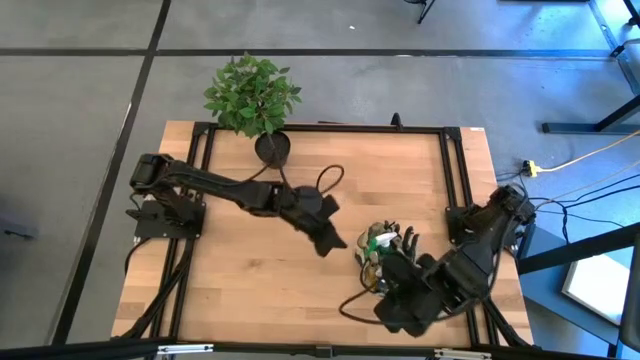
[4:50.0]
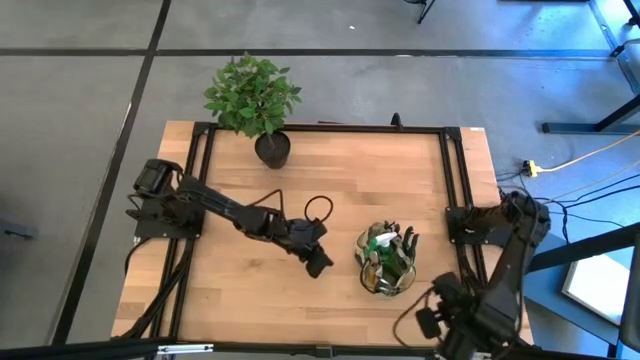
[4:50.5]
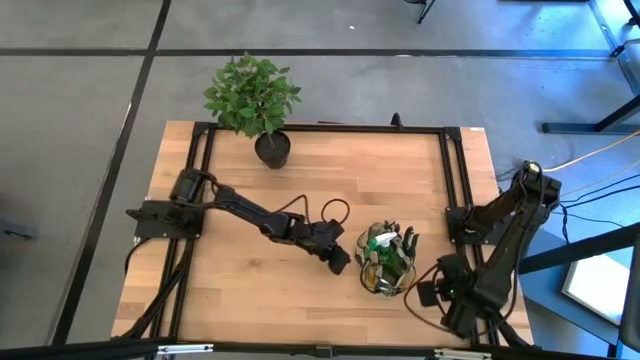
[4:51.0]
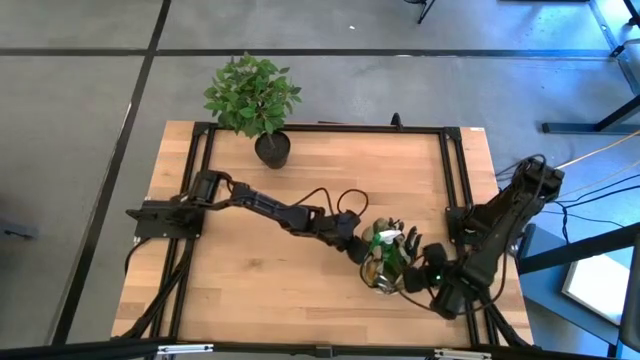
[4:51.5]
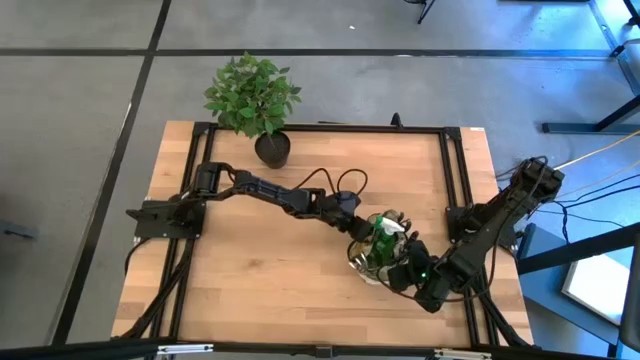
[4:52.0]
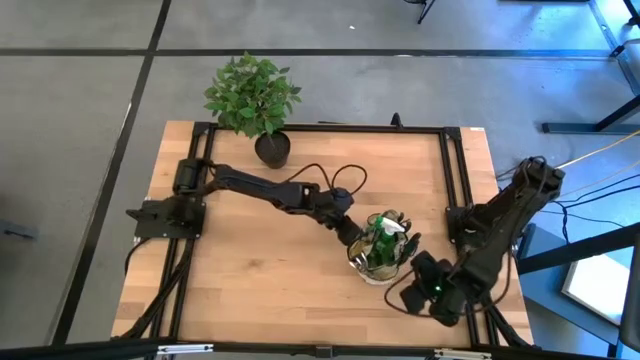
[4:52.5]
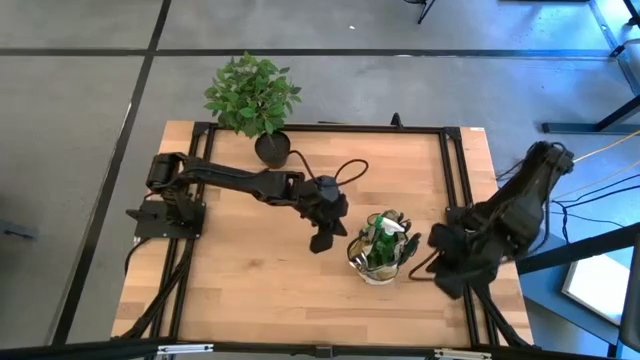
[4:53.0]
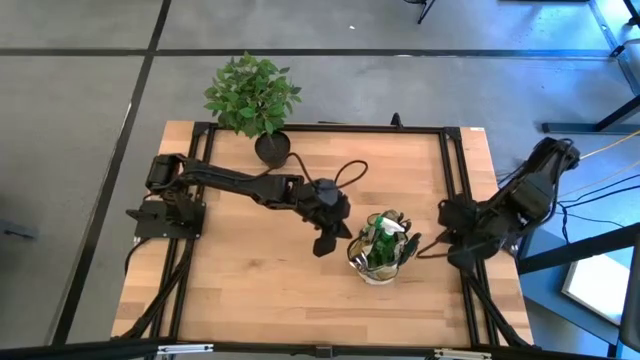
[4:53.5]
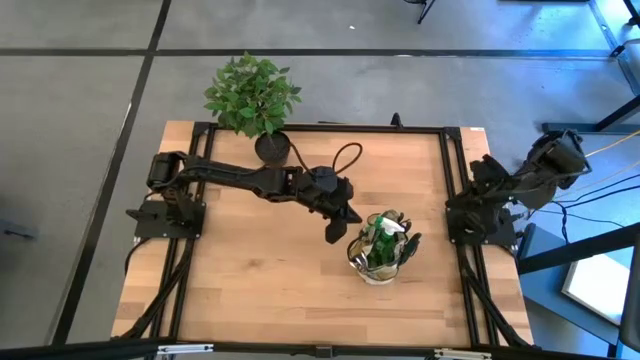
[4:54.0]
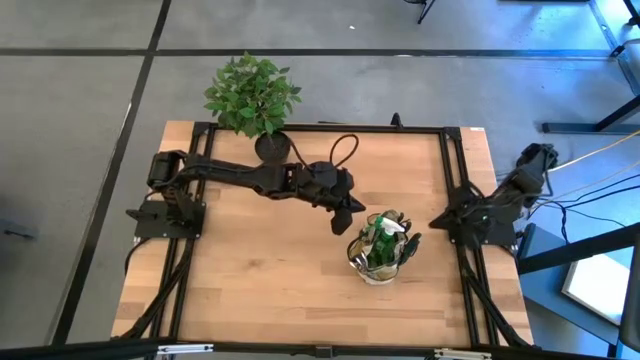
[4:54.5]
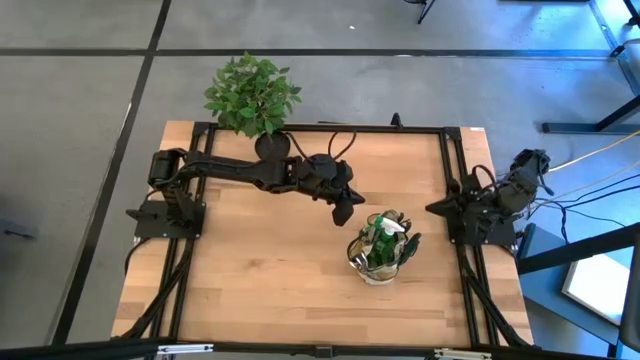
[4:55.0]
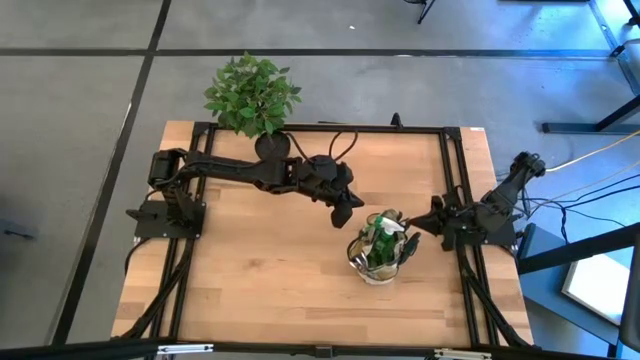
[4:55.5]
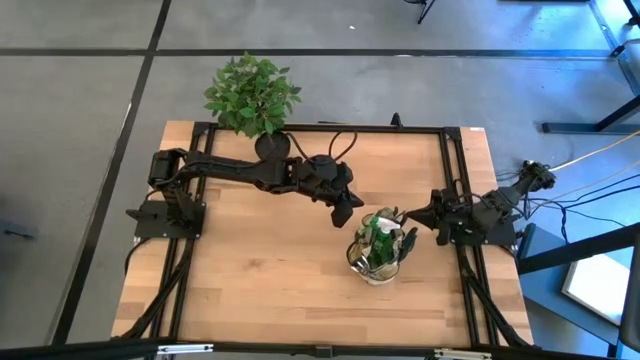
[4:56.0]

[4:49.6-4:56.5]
Task: Pick & Place Garden tools in Gardening bag
Adjust the brown gardening bag on the table

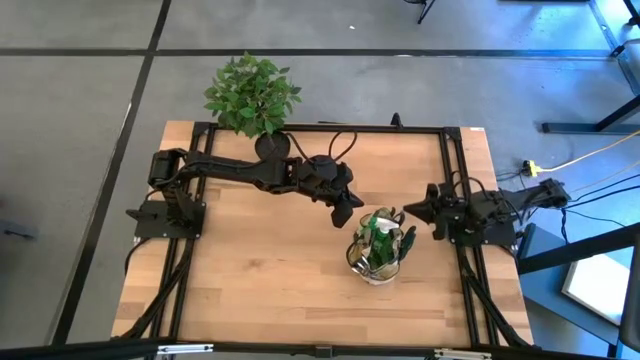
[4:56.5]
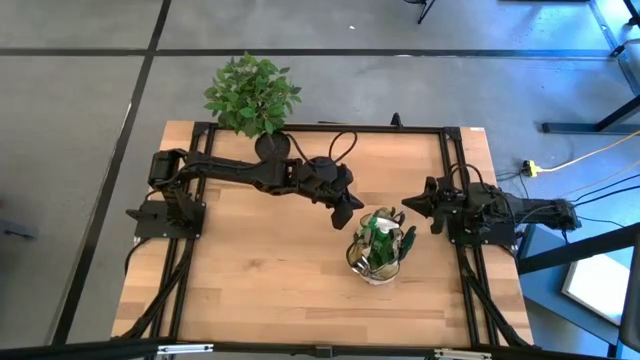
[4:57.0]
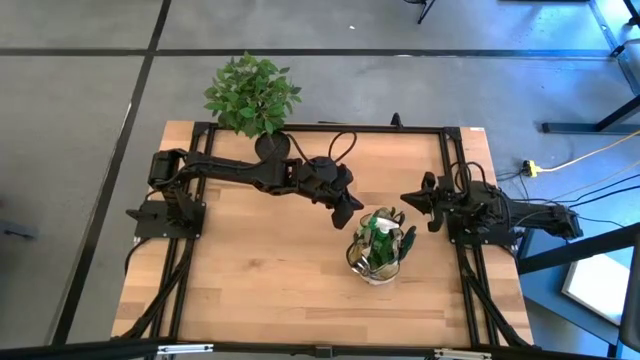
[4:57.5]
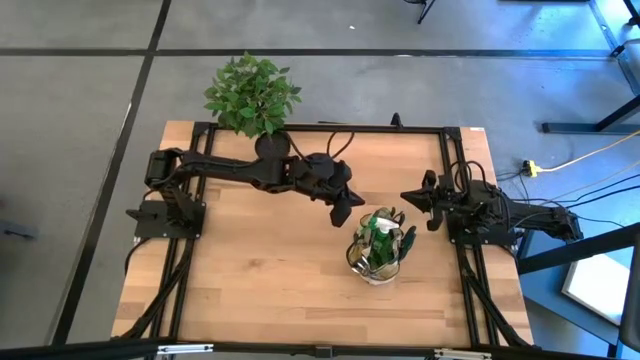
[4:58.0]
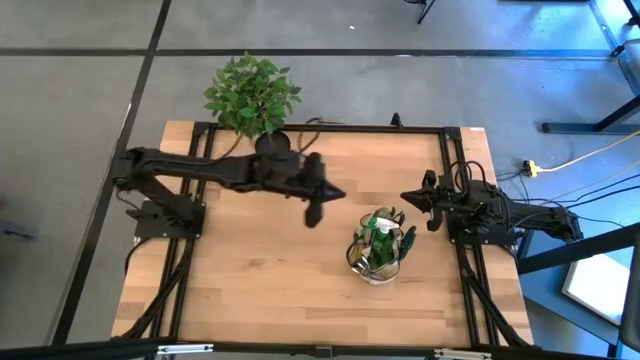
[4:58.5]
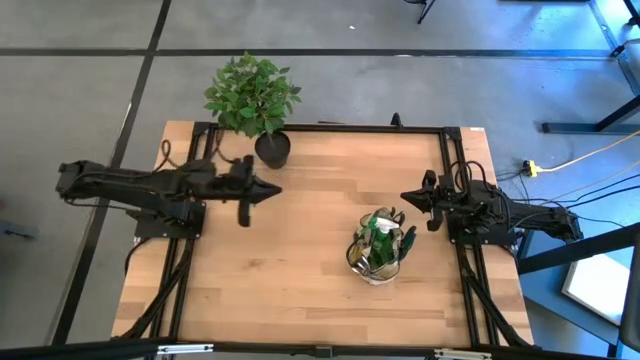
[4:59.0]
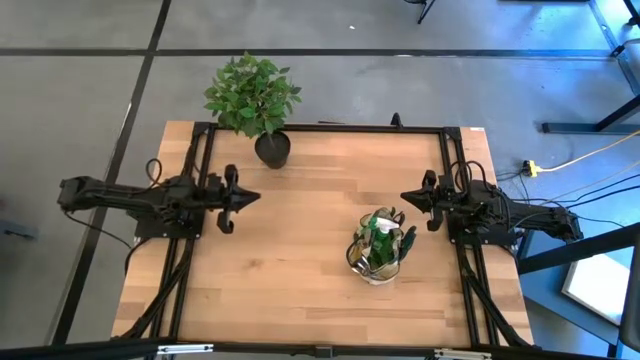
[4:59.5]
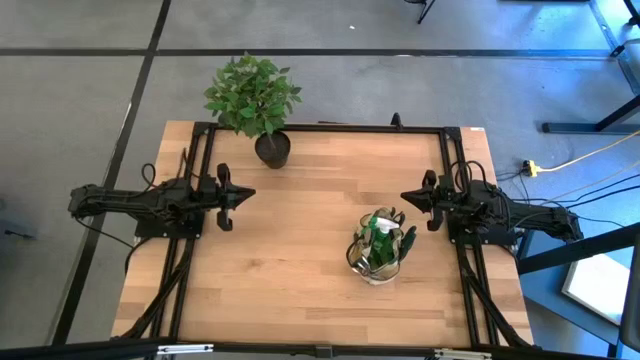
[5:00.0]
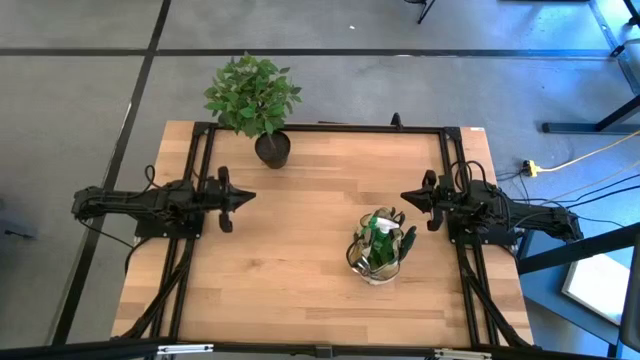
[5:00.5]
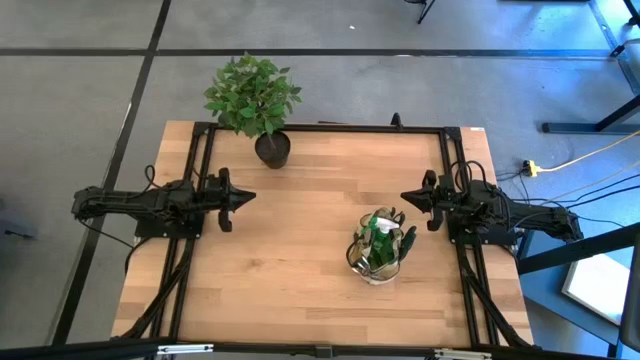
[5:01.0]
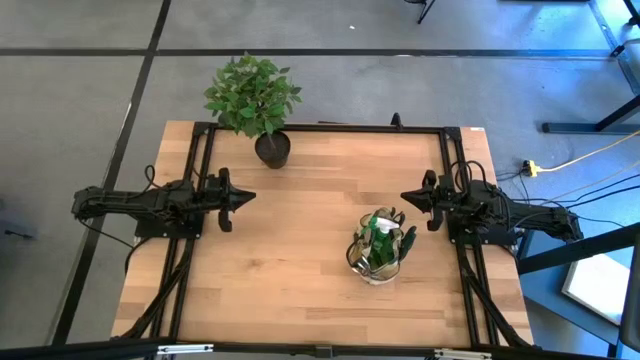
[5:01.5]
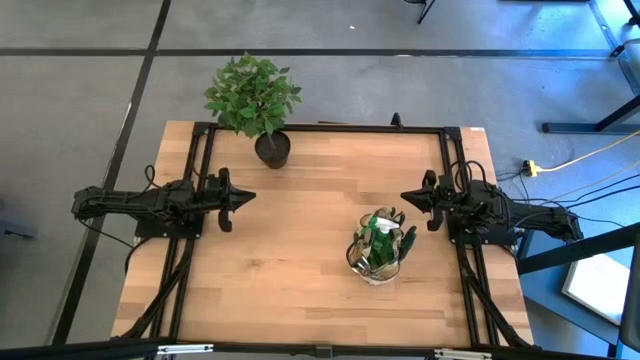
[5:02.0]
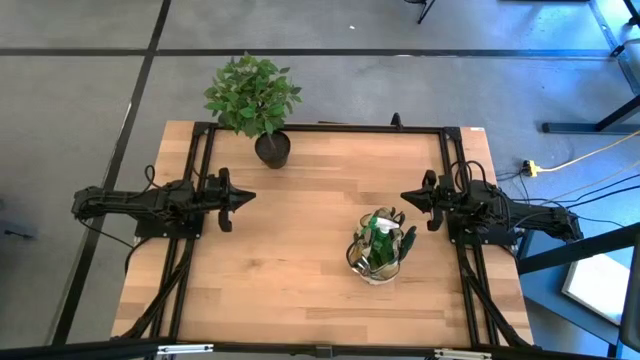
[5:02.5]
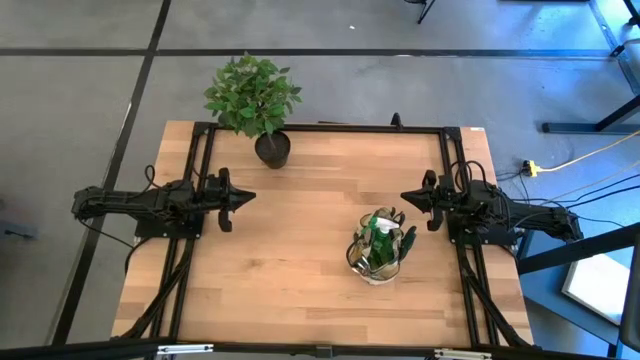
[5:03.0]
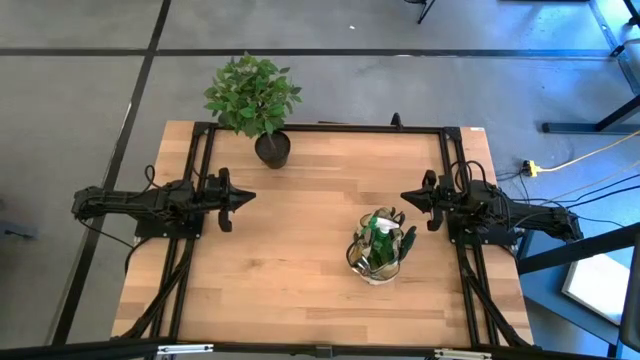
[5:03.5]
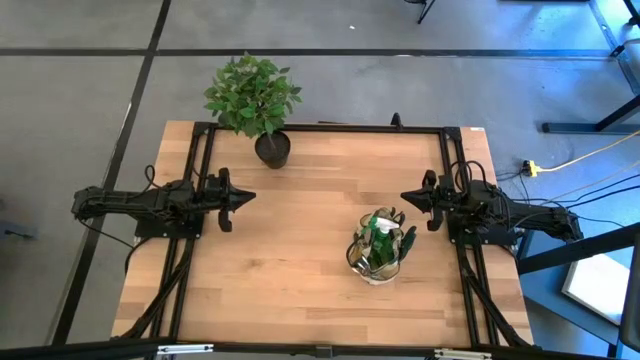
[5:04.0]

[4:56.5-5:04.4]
Return to Home Position

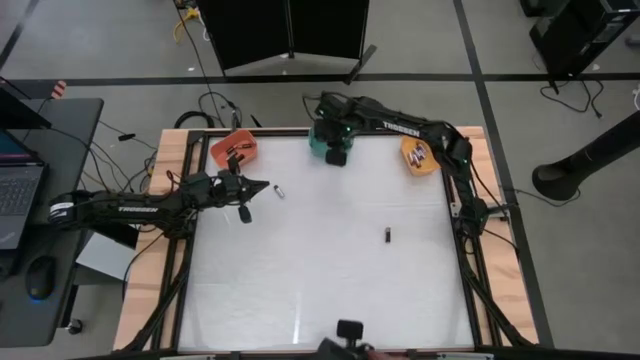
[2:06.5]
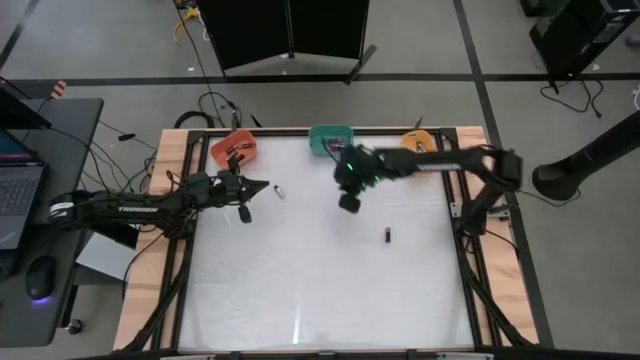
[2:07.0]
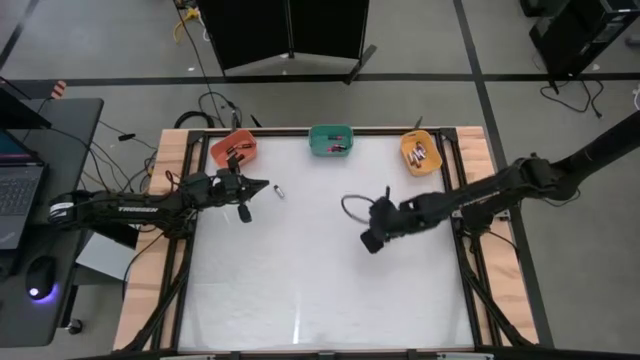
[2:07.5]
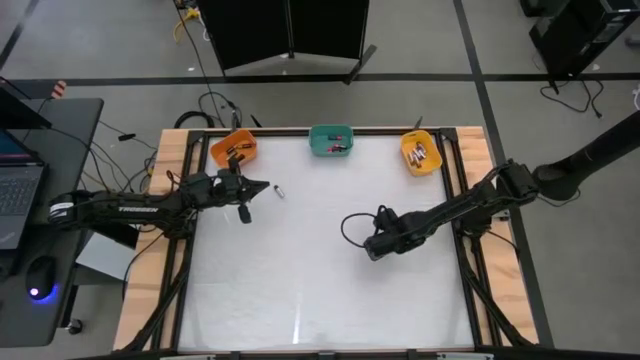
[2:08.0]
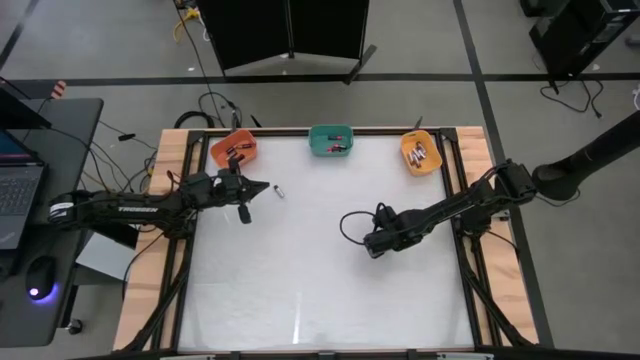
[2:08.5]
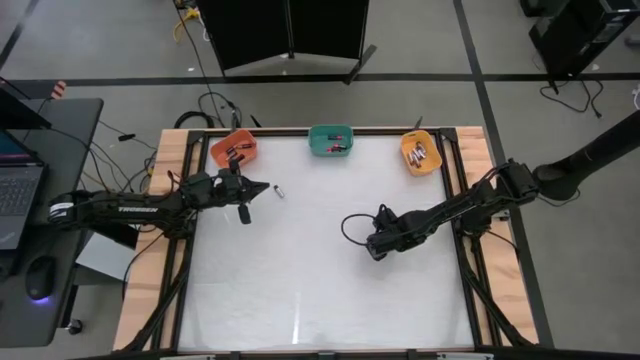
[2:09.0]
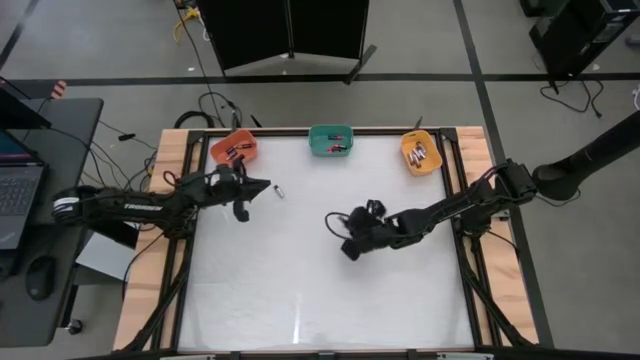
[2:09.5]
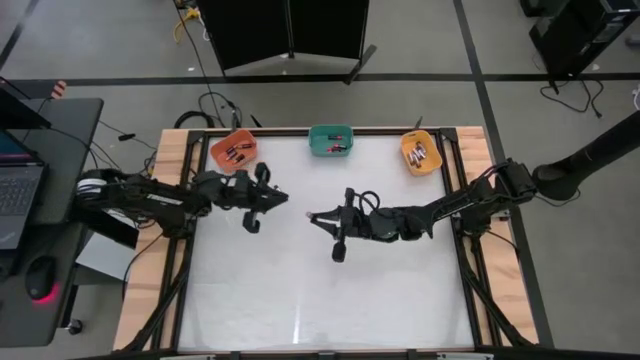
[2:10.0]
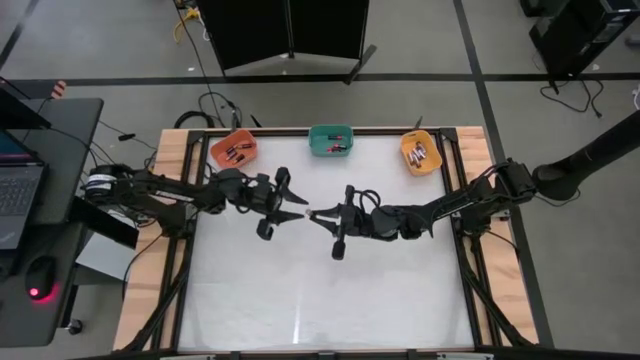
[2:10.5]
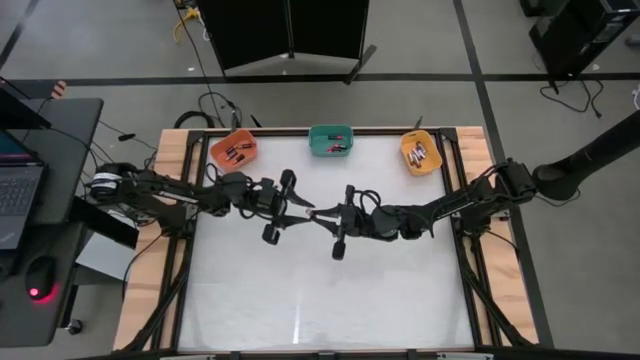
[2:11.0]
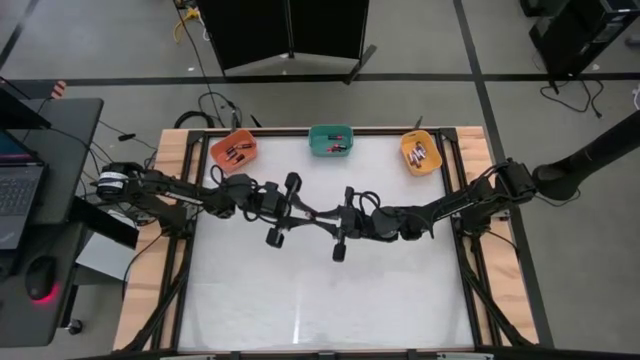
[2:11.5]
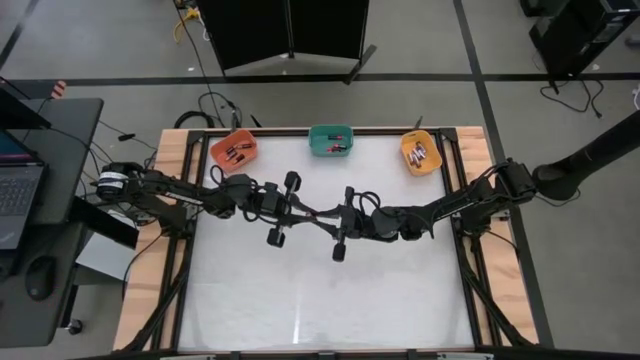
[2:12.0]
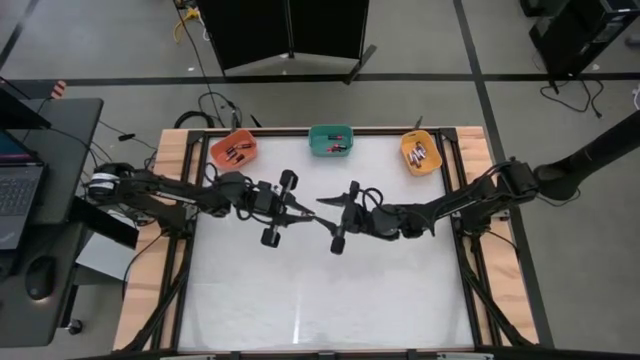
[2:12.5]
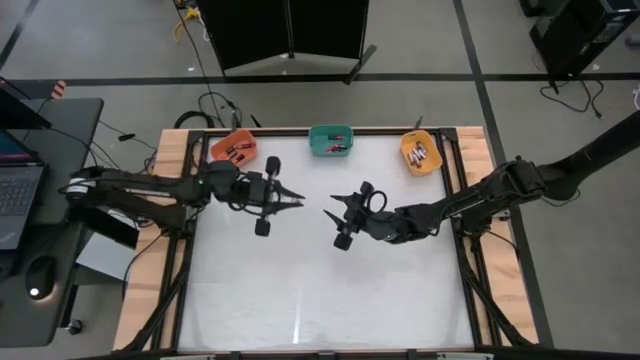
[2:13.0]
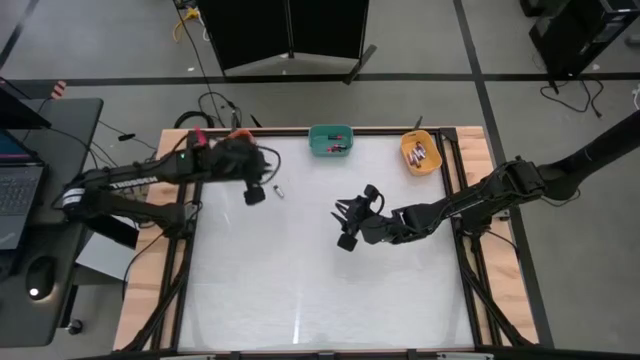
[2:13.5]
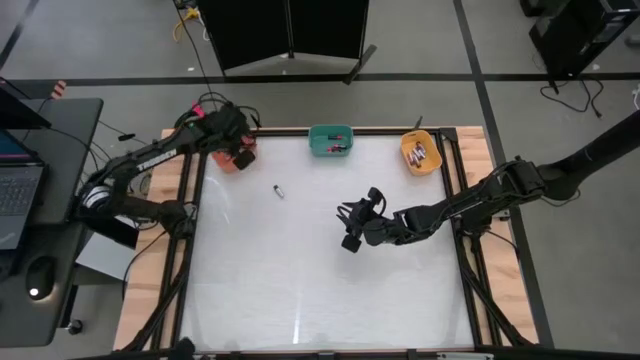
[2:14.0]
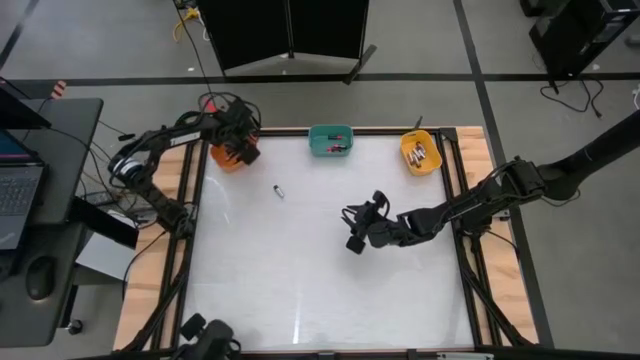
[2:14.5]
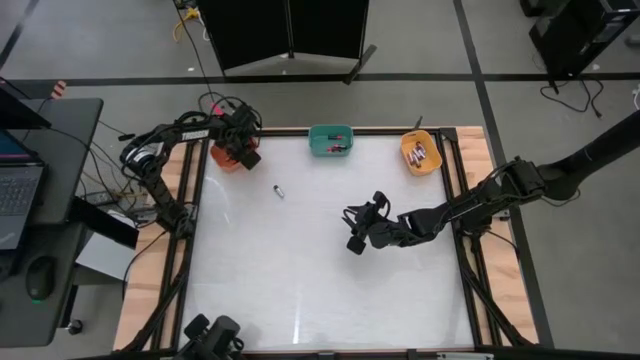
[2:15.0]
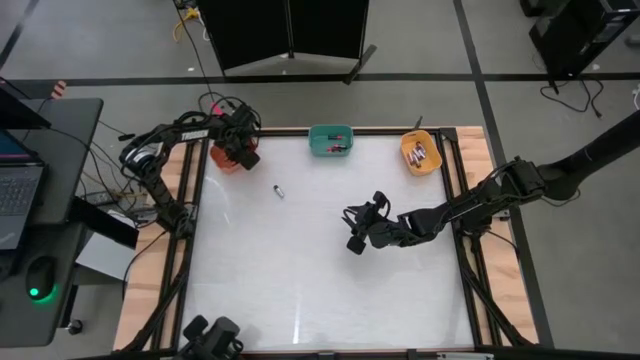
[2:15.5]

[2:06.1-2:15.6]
Task: Sort batteries
Put the brown battery into the orange bin
